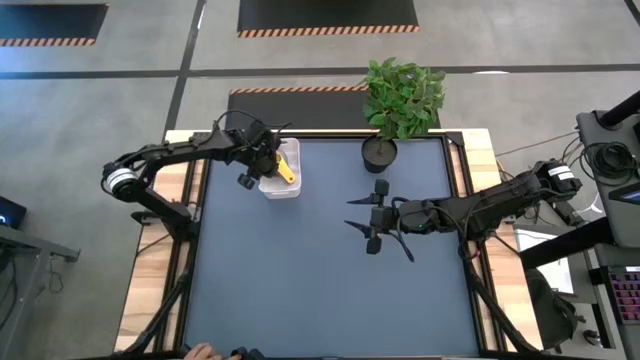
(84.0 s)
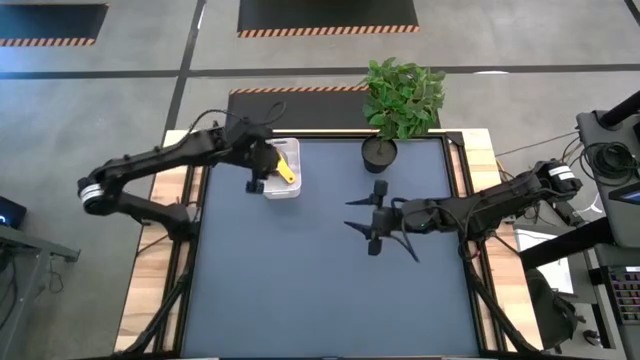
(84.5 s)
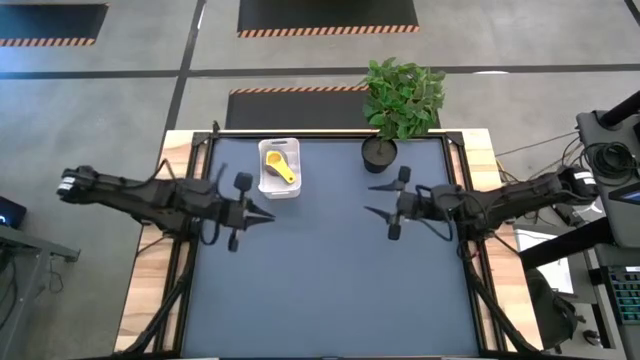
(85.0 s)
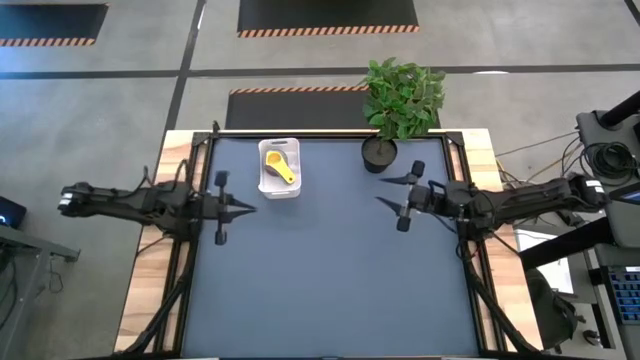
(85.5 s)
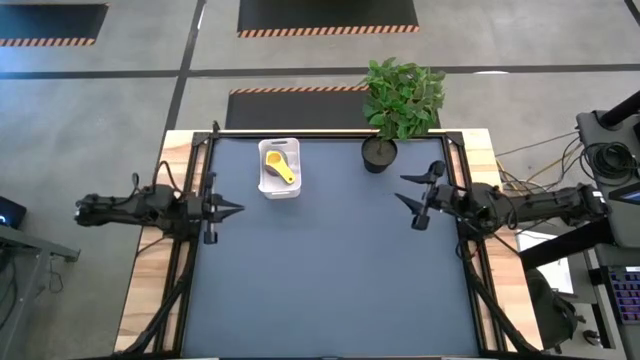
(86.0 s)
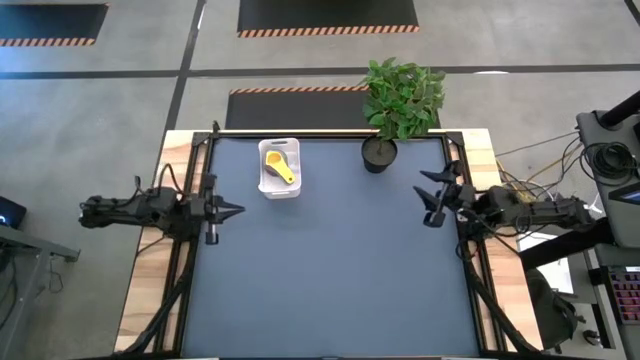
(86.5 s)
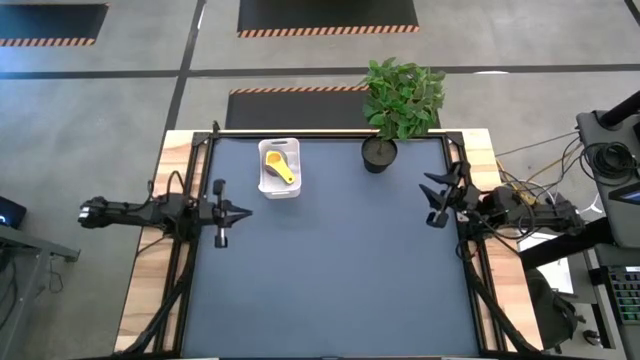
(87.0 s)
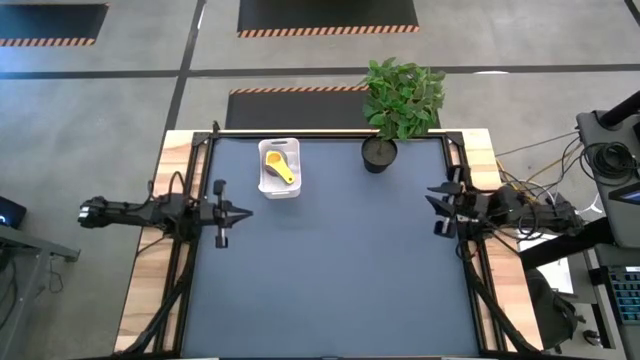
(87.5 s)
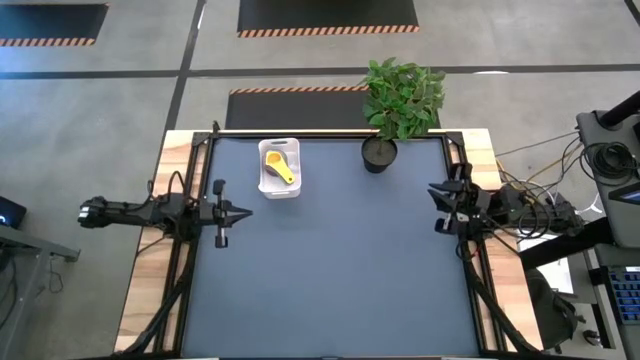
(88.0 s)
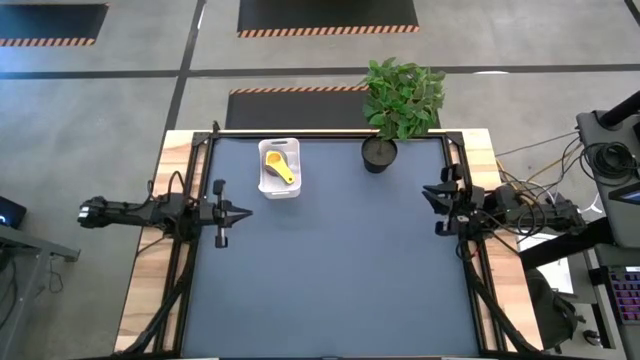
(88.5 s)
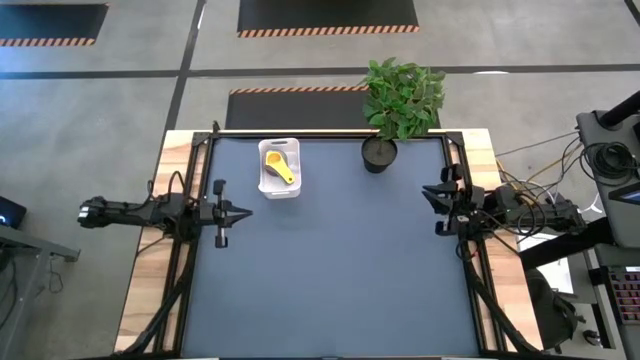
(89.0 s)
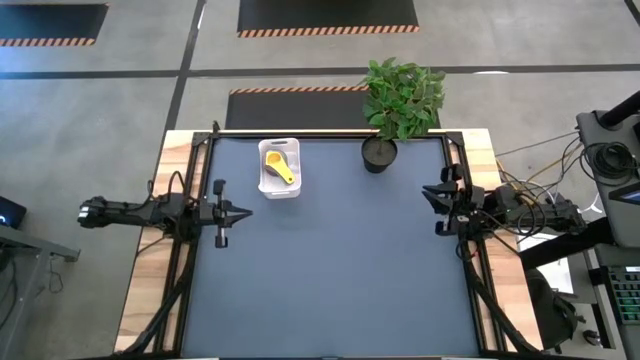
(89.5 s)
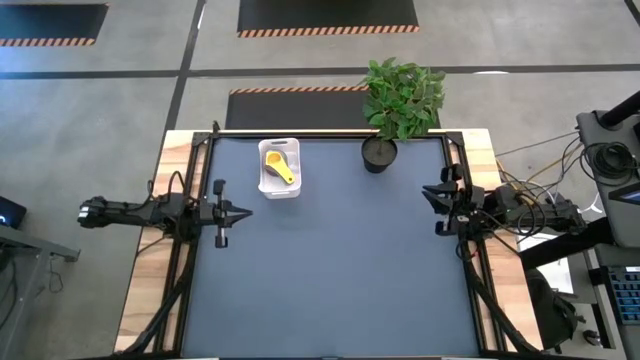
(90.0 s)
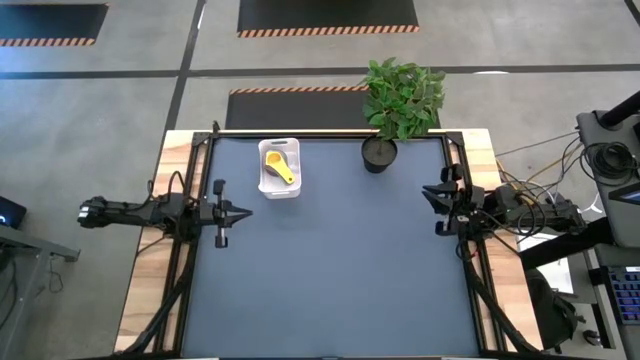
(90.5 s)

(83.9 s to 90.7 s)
Task: Nest measuring cups in basket
Return to Home Position

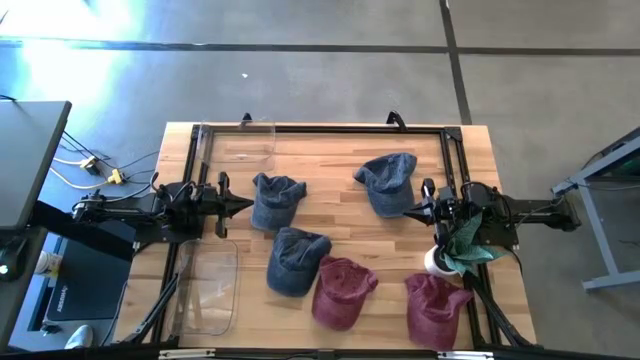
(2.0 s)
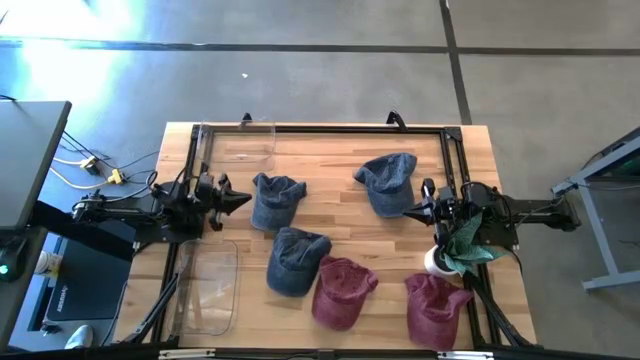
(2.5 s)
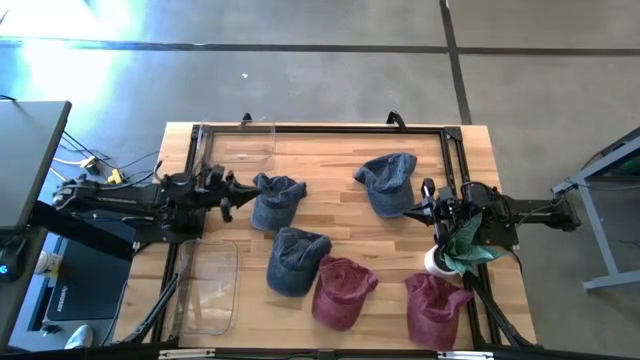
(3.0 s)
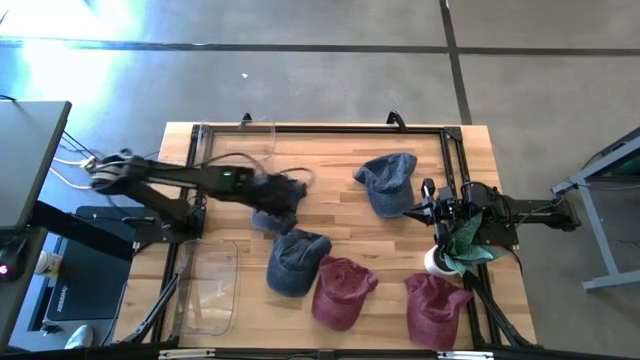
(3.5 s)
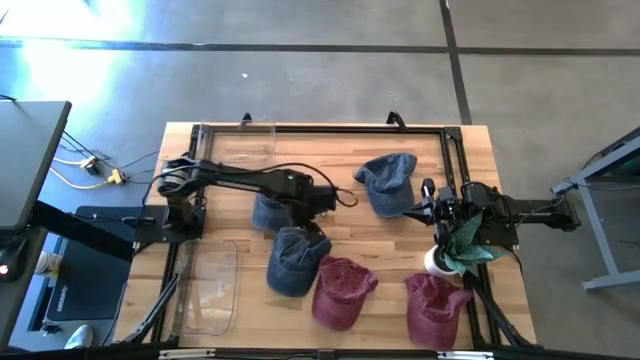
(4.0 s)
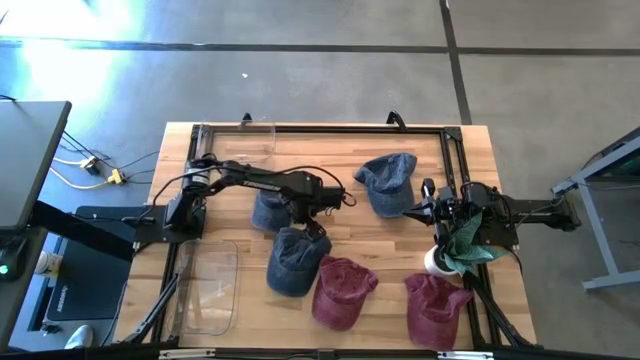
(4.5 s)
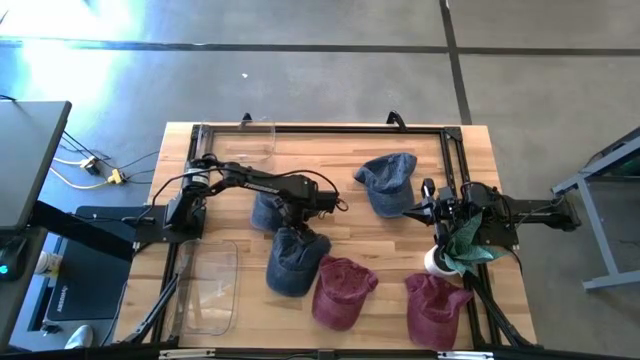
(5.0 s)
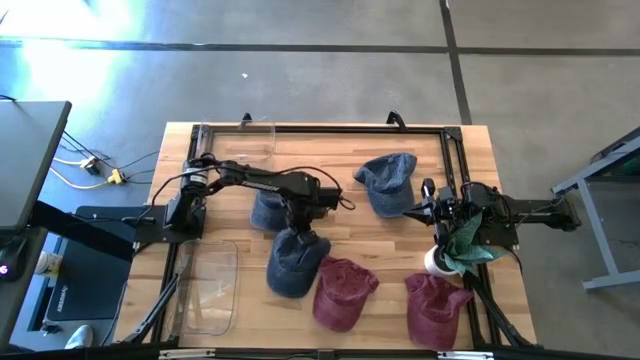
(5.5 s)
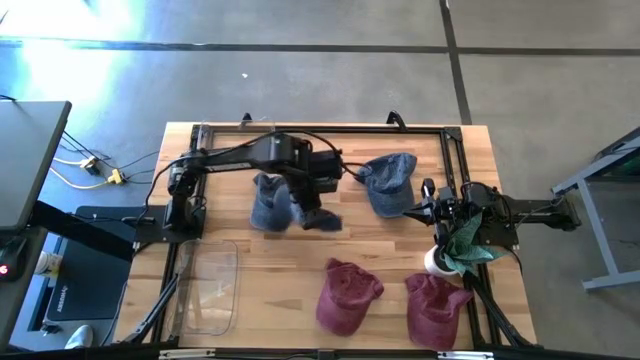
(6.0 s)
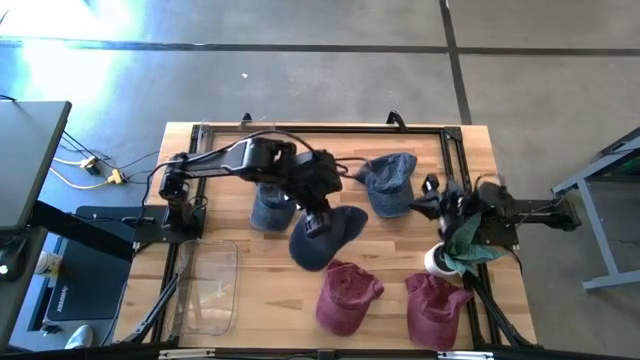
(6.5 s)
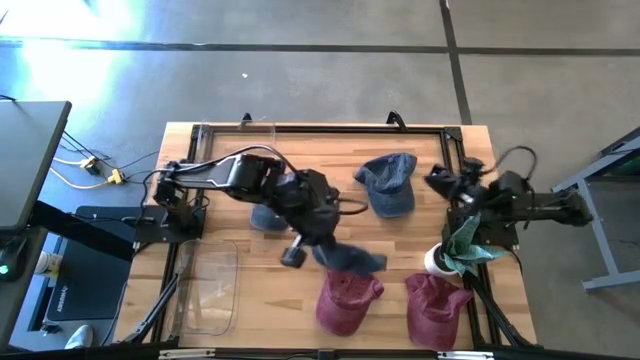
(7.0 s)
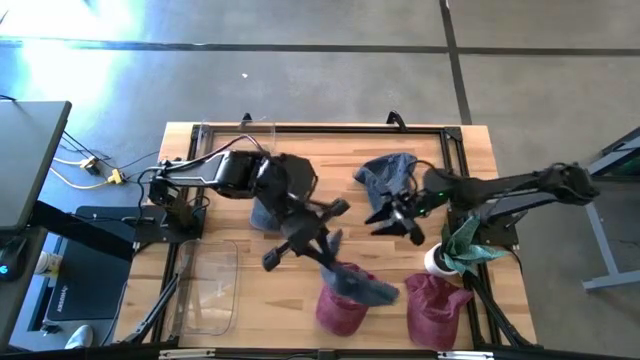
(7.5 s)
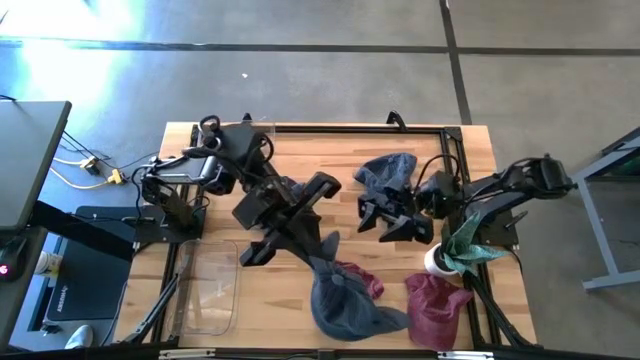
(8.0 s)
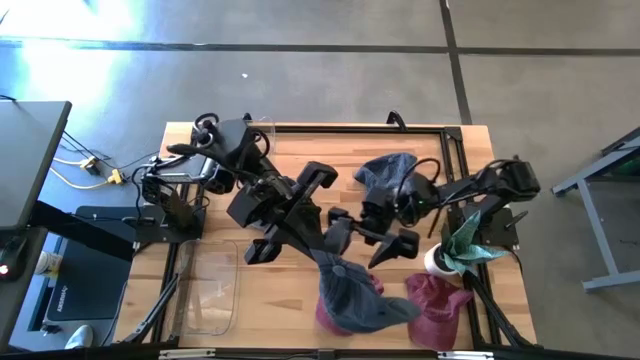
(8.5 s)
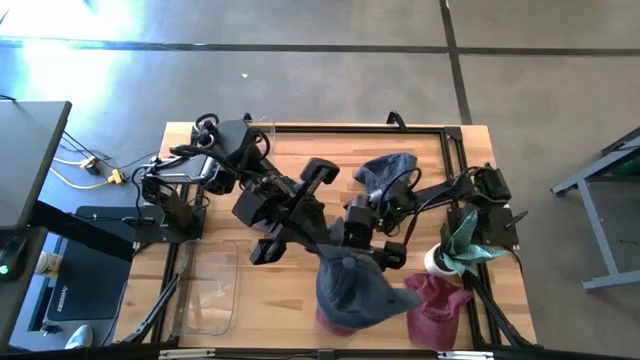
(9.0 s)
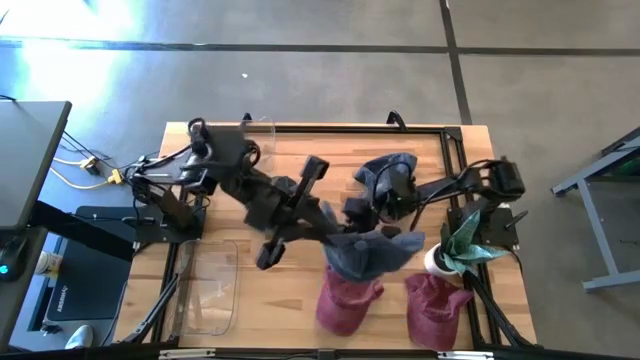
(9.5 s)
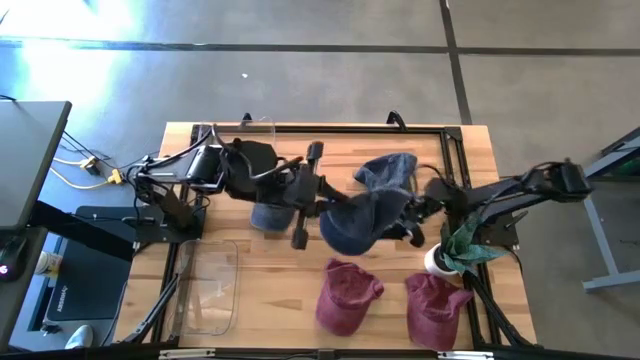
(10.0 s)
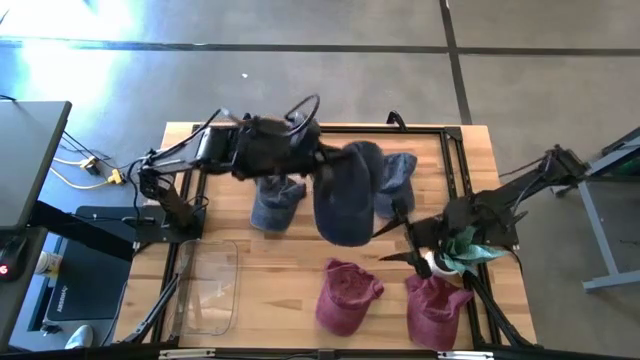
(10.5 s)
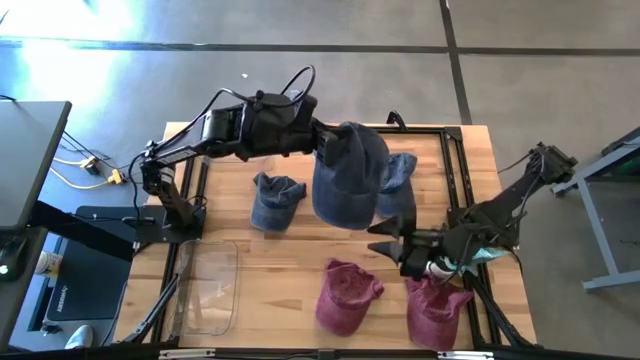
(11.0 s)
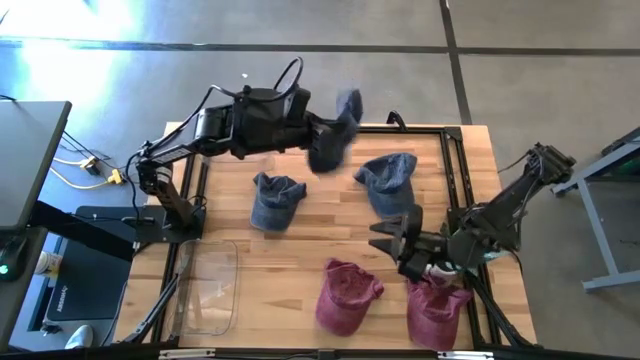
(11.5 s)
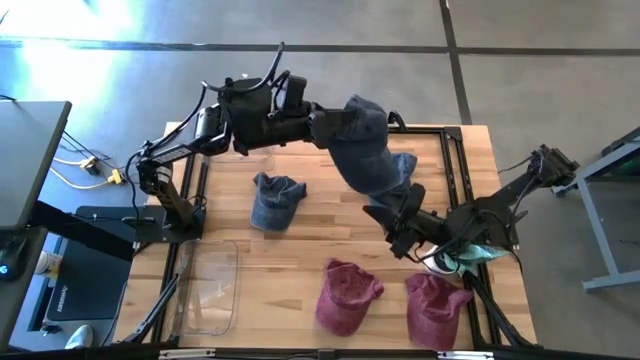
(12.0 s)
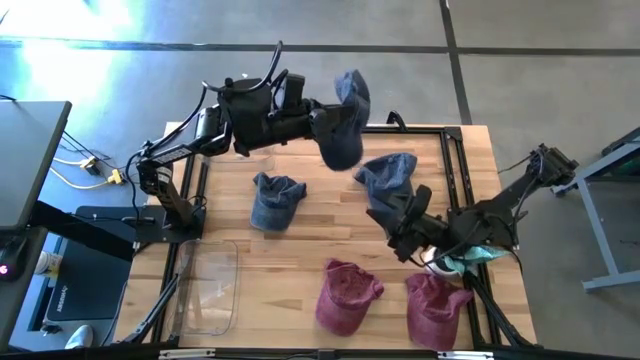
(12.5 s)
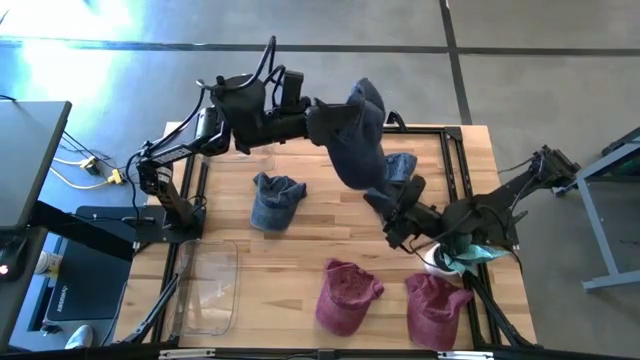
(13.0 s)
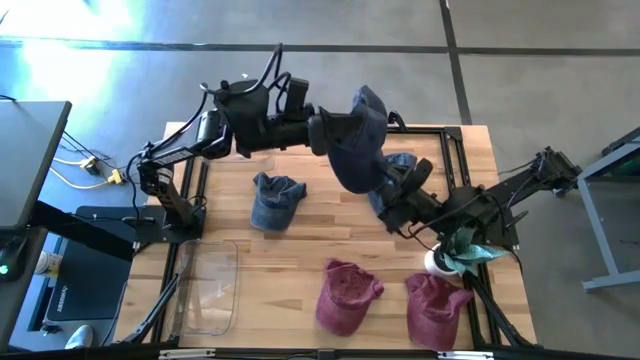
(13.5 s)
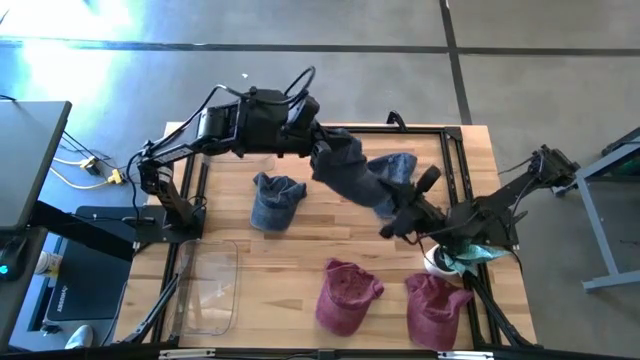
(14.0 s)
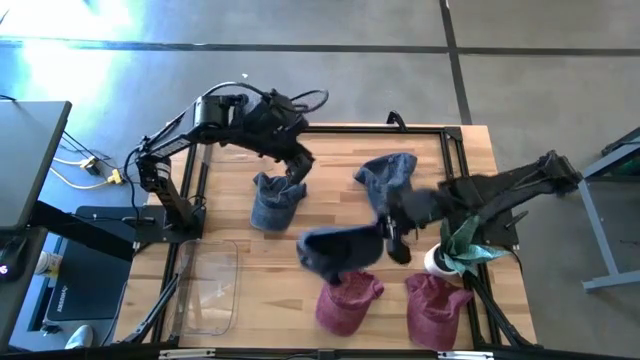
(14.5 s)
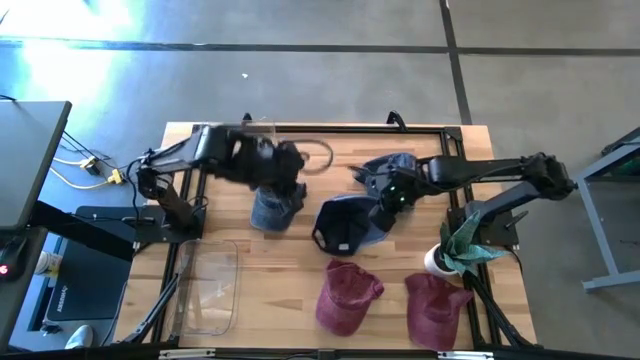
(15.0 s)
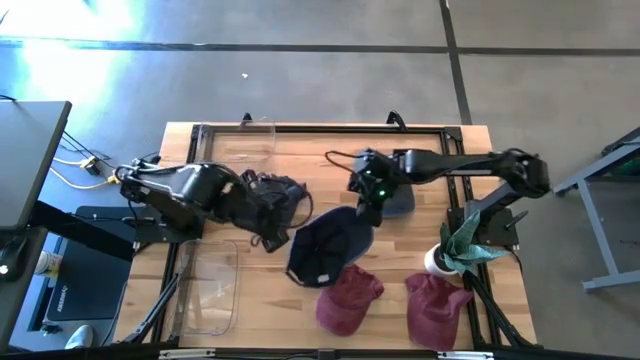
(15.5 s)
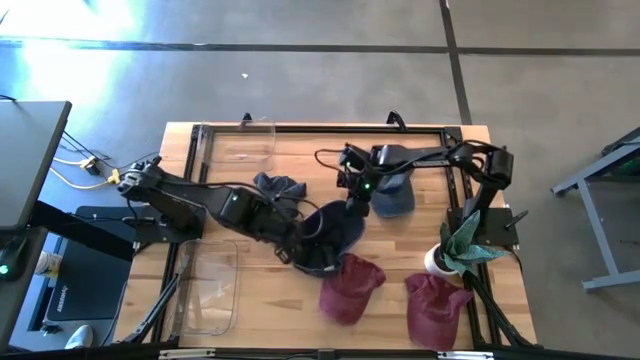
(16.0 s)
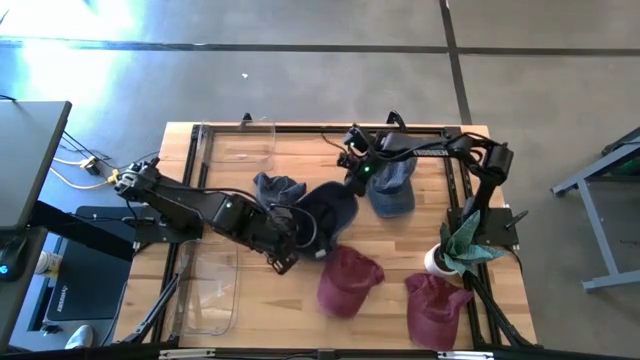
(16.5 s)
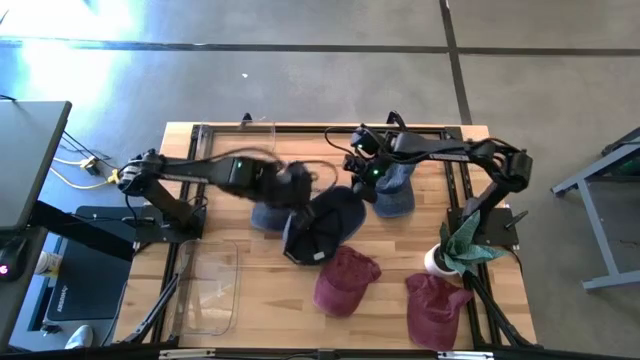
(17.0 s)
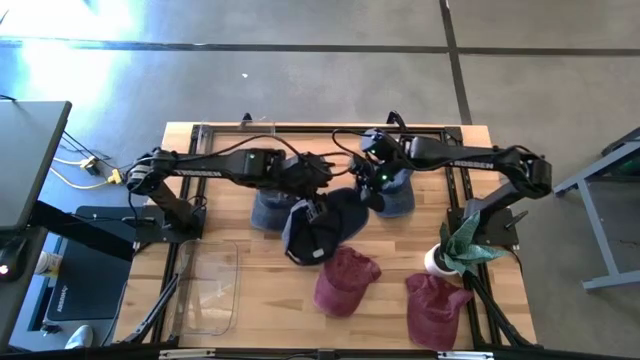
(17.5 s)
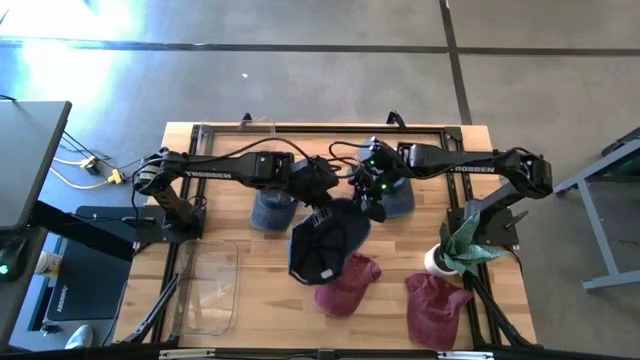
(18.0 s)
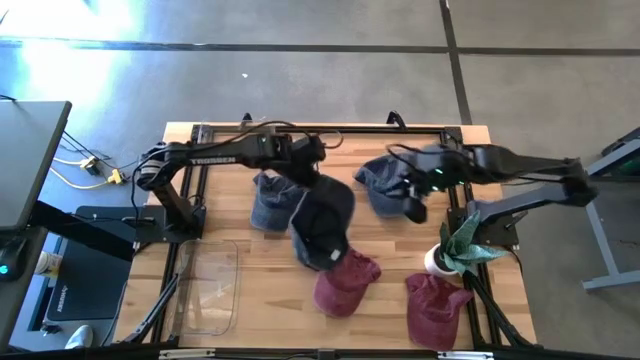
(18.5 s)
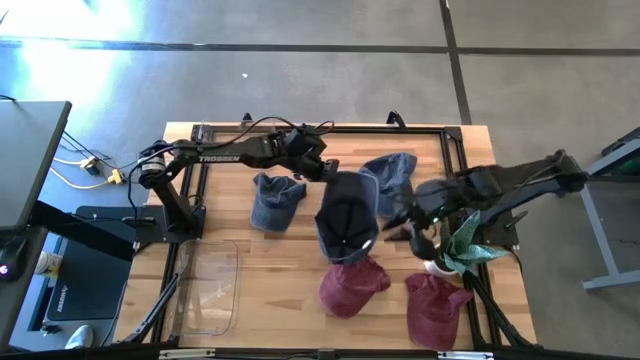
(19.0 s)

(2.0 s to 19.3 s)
Task: Pick & Place hat
Put the bottom blue cap into the top transparent bin
